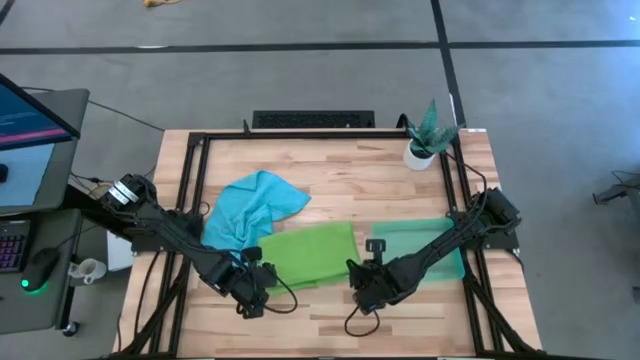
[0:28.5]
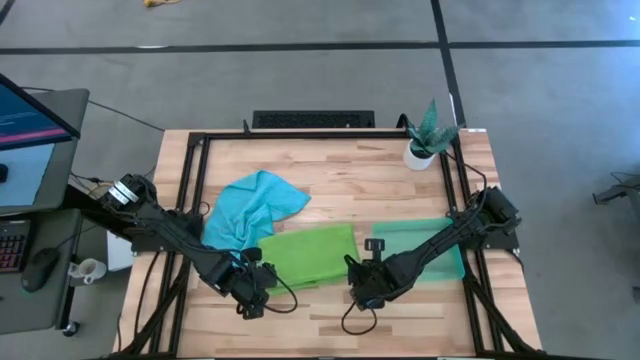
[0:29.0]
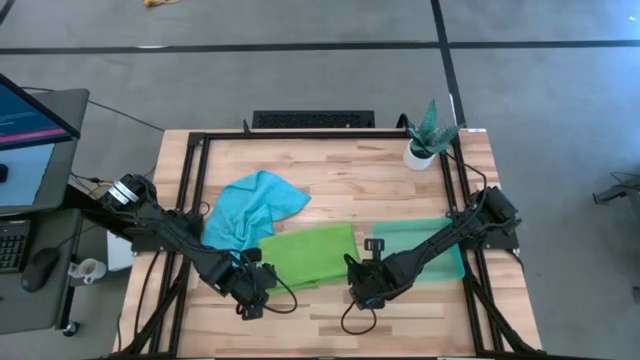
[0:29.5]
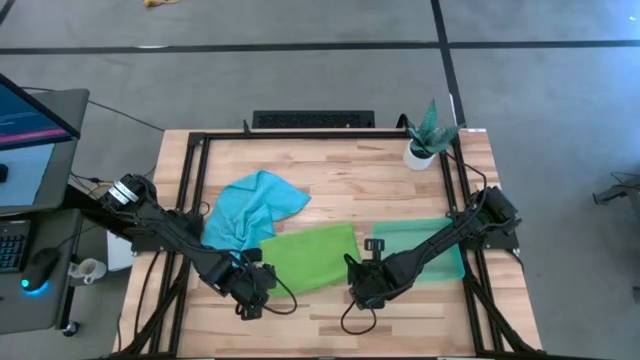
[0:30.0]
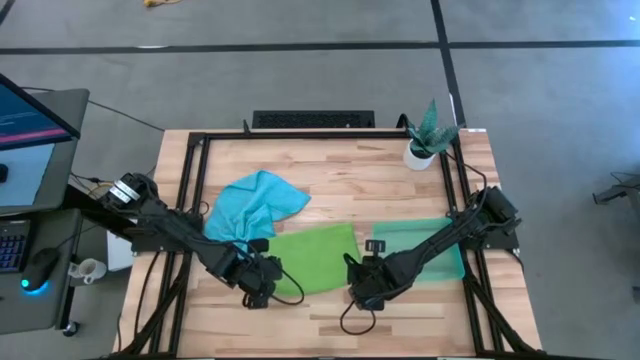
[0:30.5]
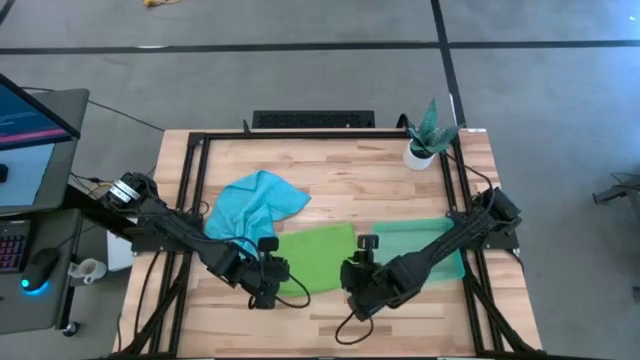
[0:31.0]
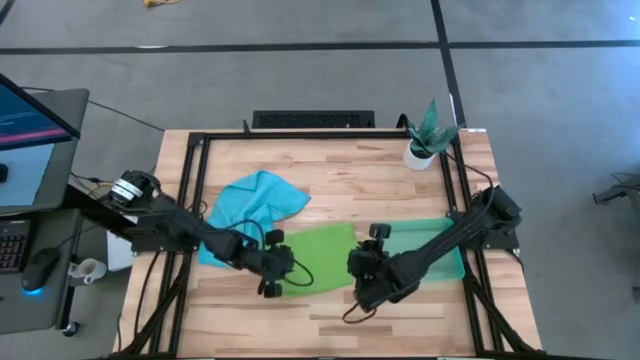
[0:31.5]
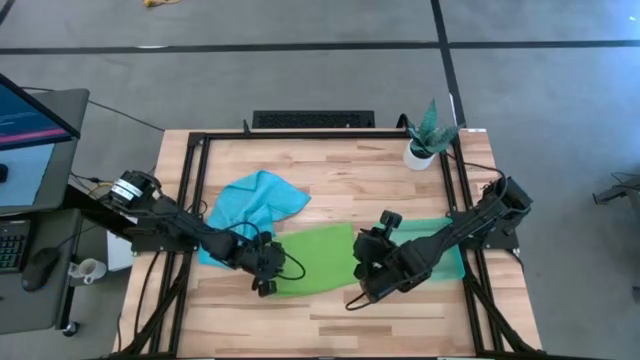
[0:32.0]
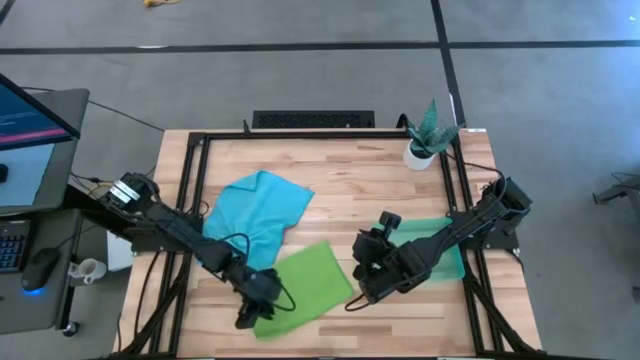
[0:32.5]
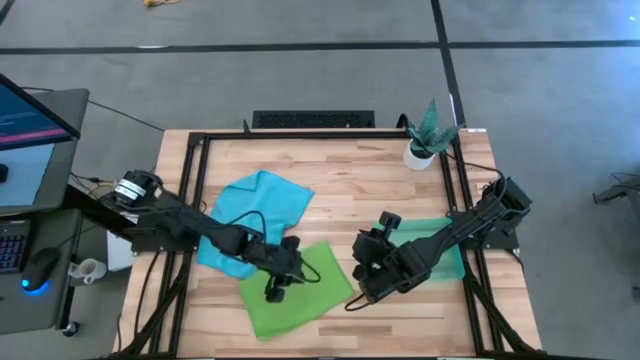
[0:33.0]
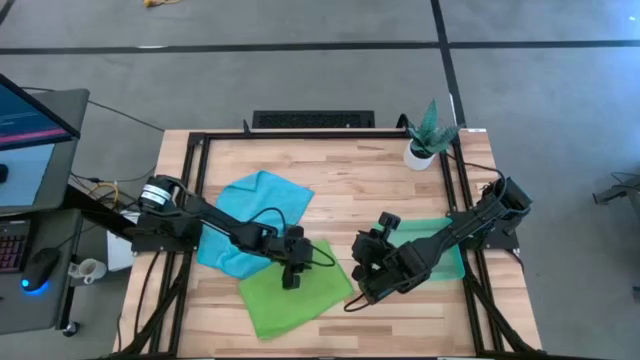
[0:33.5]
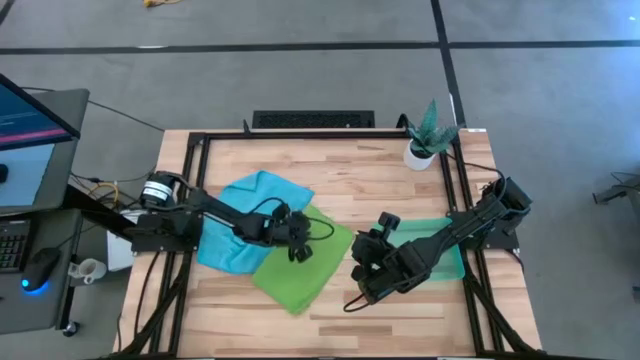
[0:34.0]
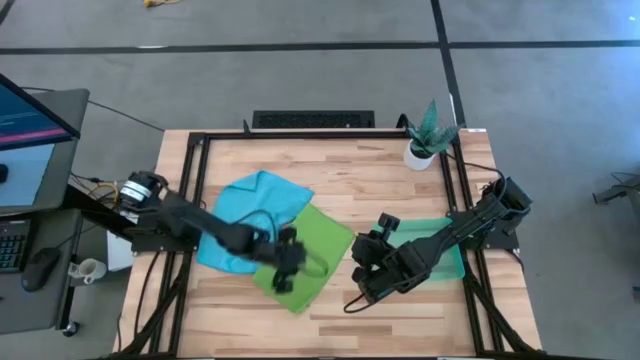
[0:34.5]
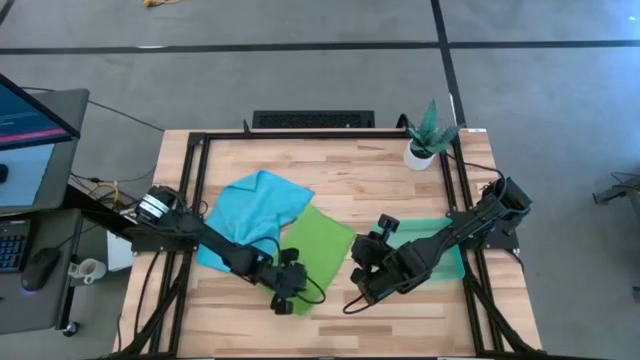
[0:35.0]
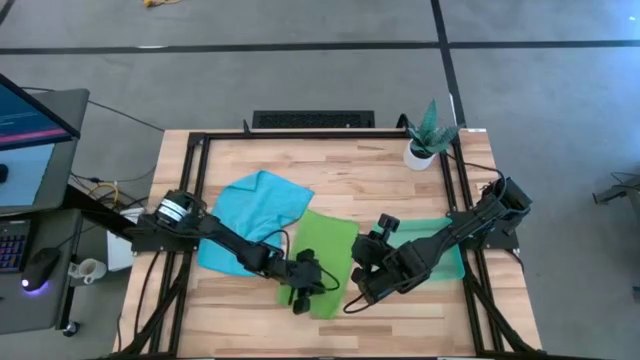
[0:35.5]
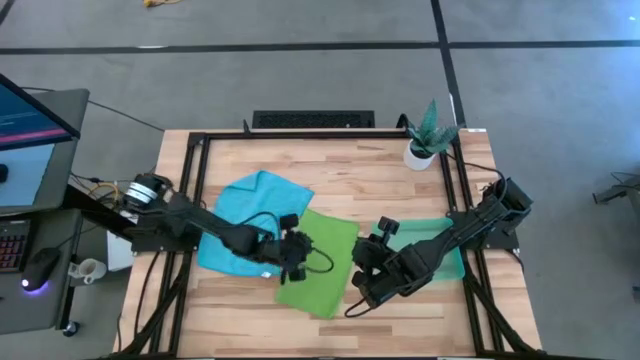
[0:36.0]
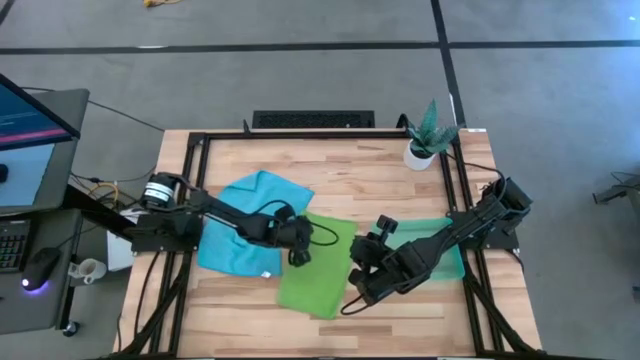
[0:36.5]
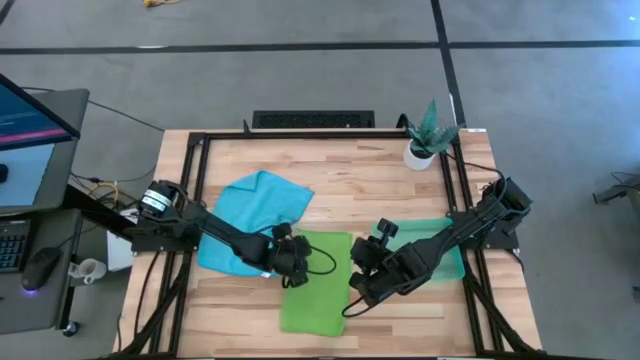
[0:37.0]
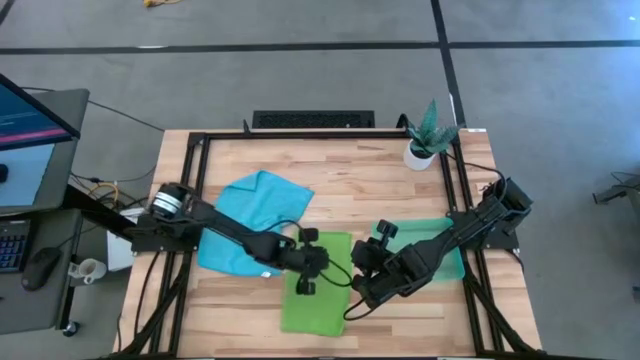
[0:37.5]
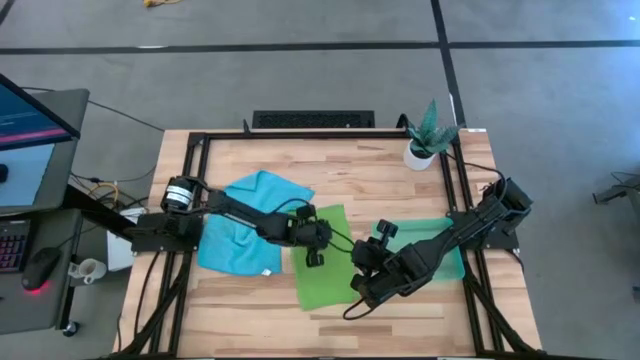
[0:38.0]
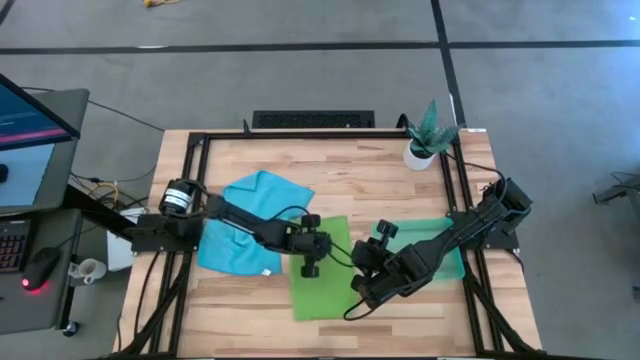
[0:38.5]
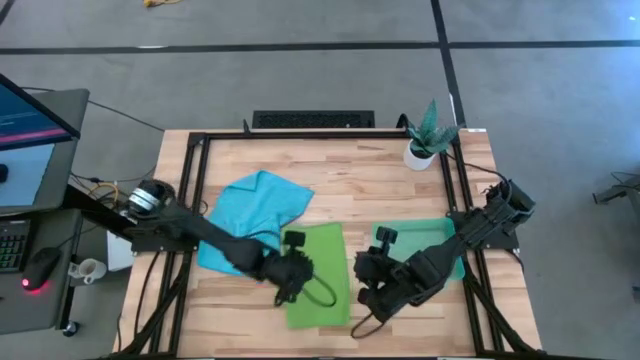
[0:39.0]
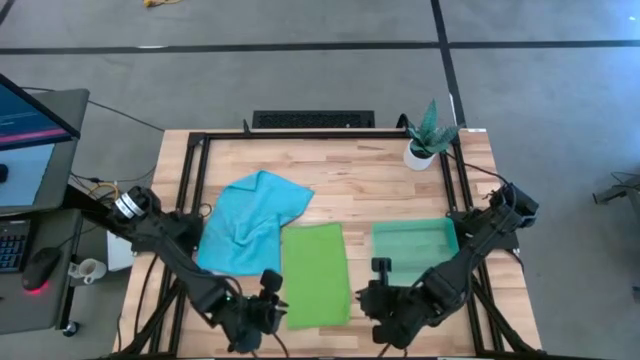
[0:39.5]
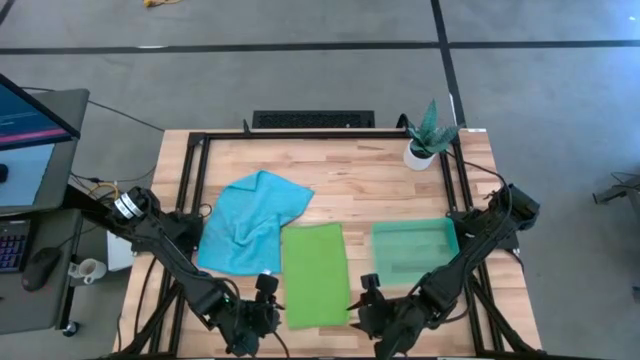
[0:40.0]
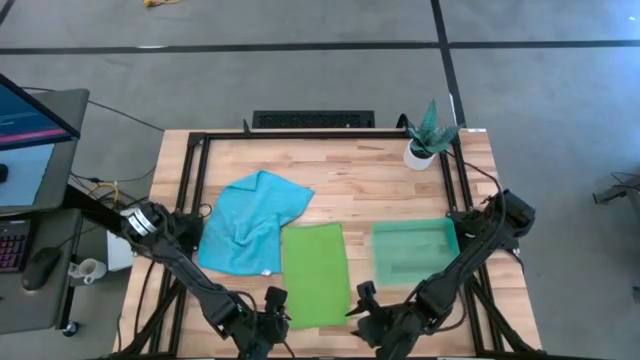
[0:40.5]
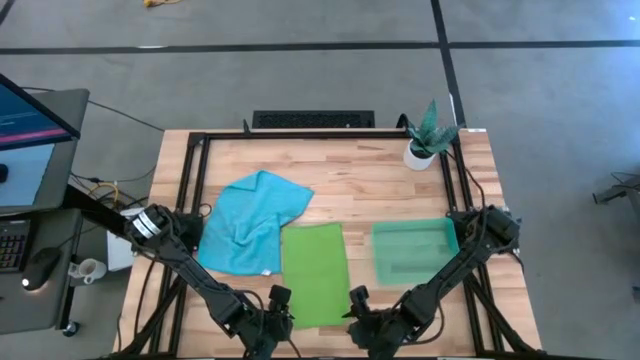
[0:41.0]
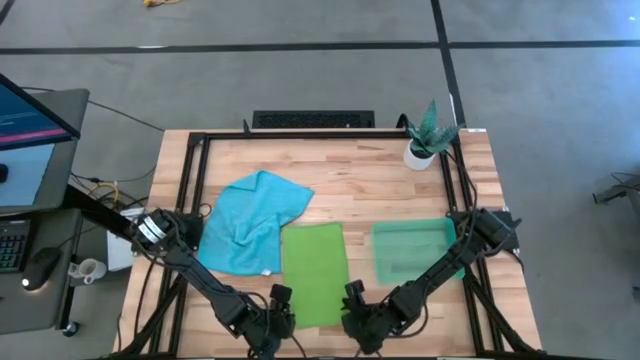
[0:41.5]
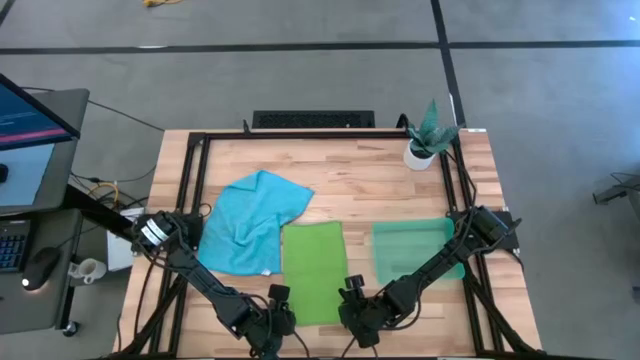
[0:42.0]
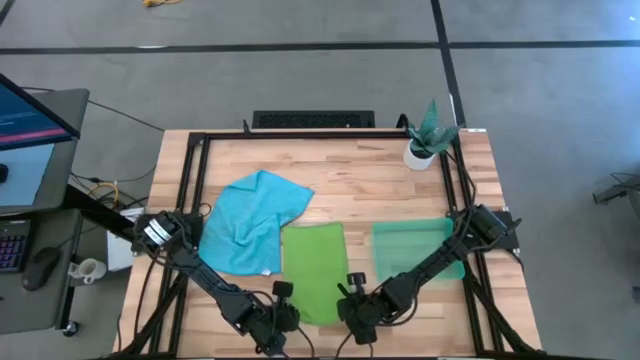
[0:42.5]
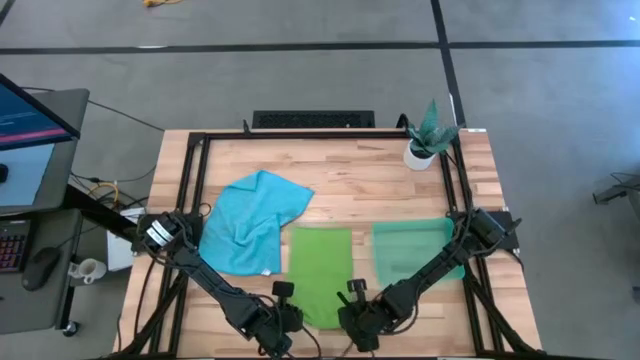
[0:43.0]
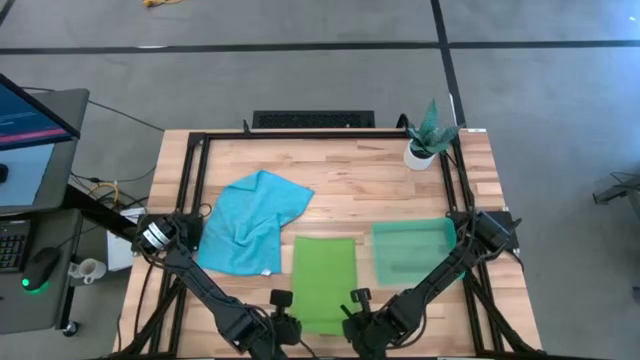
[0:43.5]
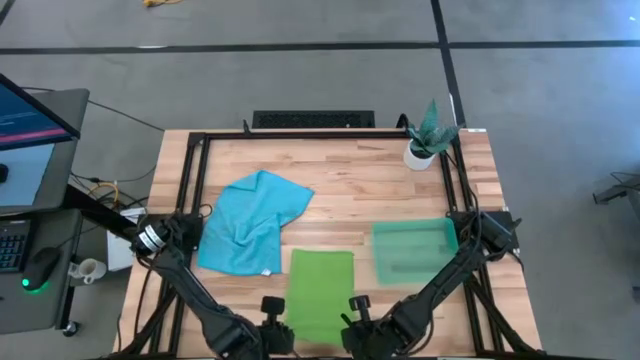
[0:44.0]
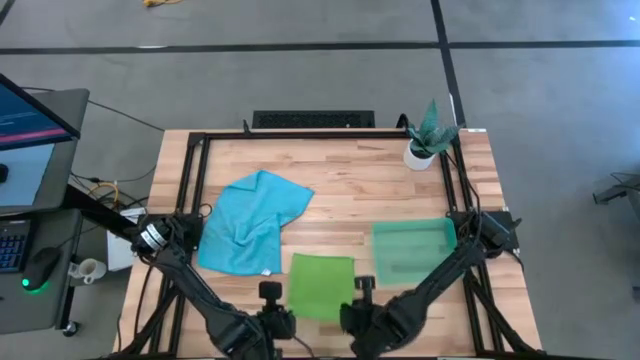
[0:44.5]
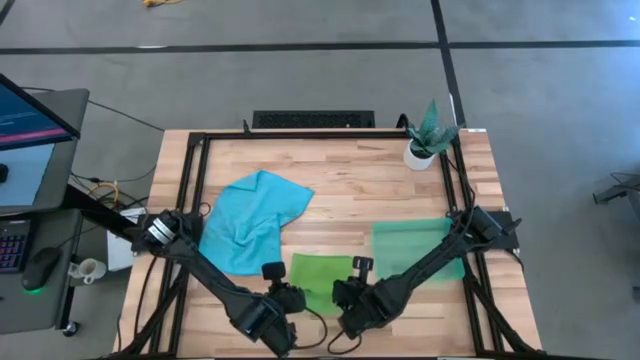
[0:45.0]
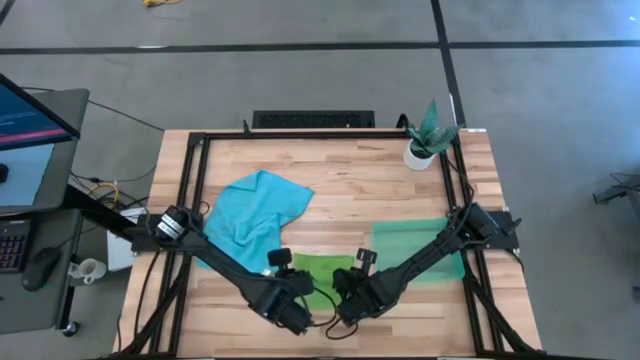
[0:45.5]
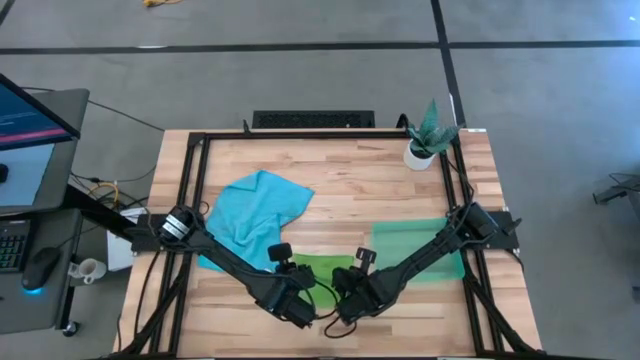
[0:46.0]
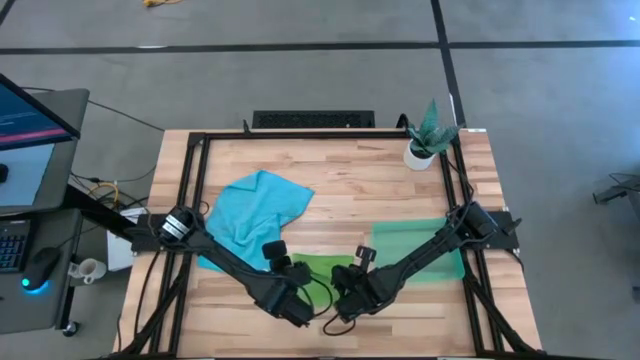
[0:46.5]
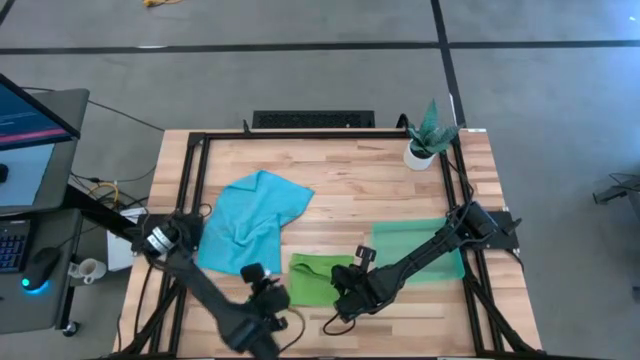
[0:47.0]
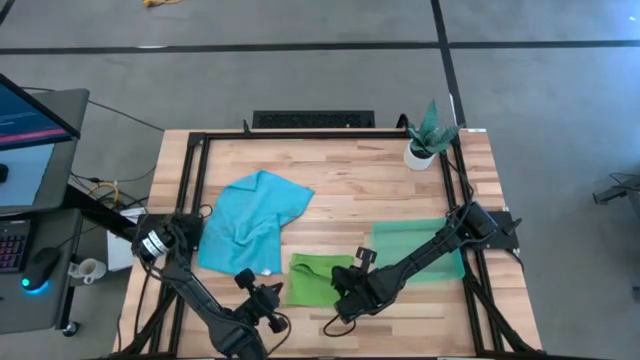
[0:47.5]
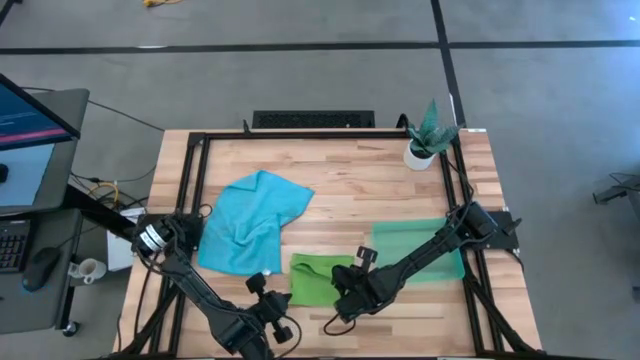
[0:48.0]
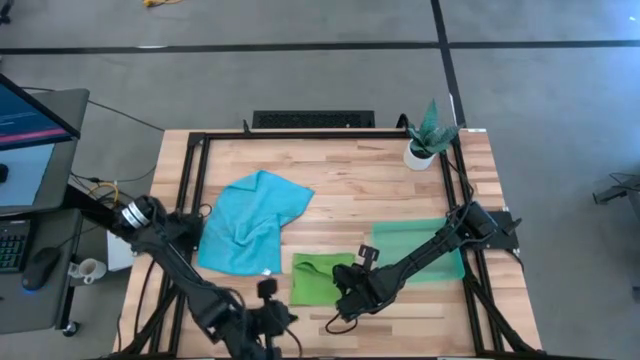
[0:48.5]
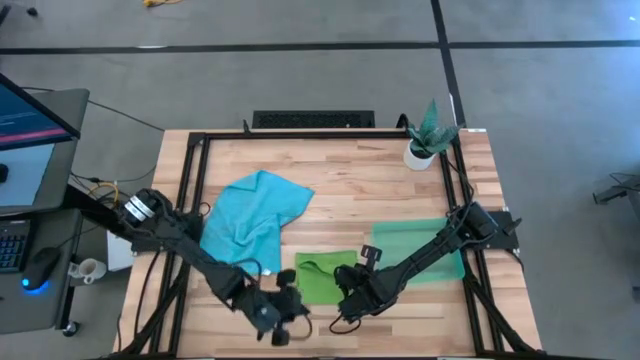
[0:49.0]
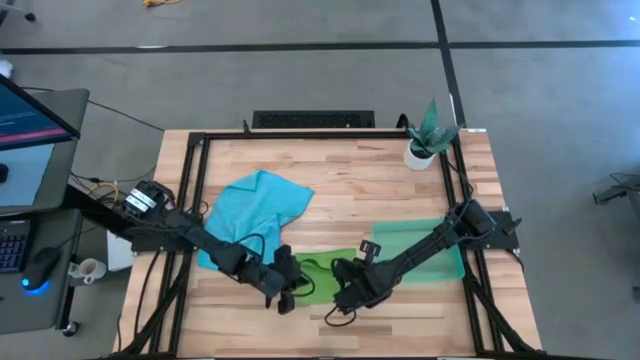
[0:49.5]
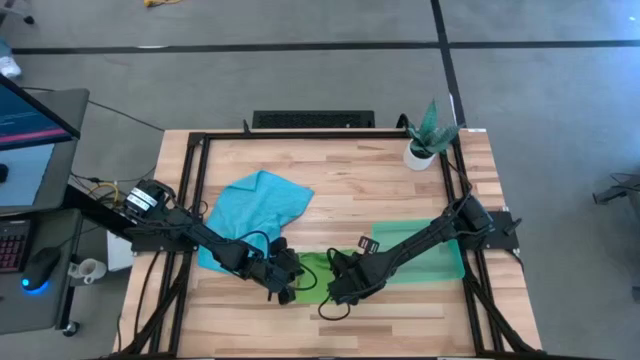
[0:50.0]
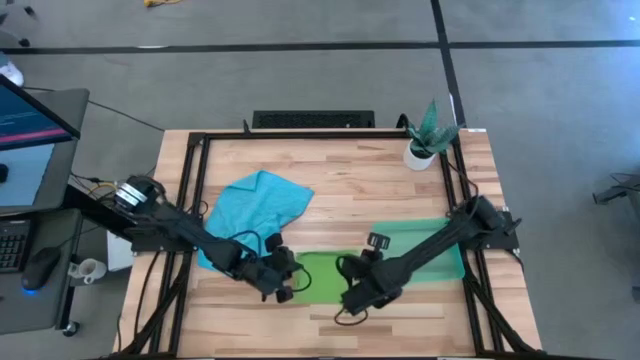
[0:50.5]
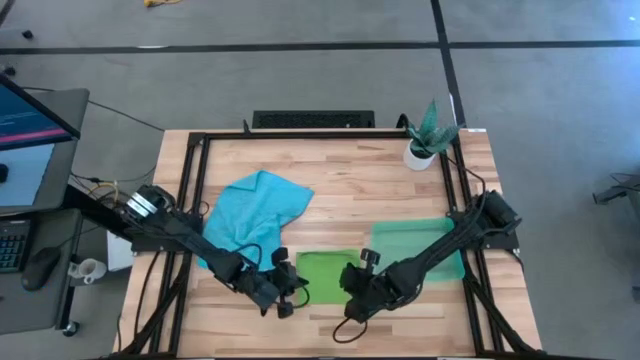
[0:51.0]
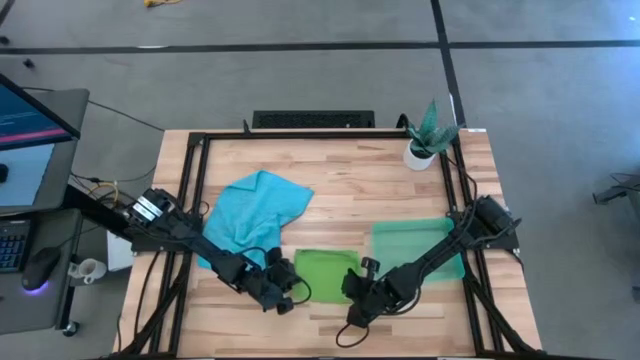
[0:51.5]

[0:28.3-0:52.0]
Task: Roll microfiber towels into tight, uniform cylinder then place into a basket
Fold the green towel
